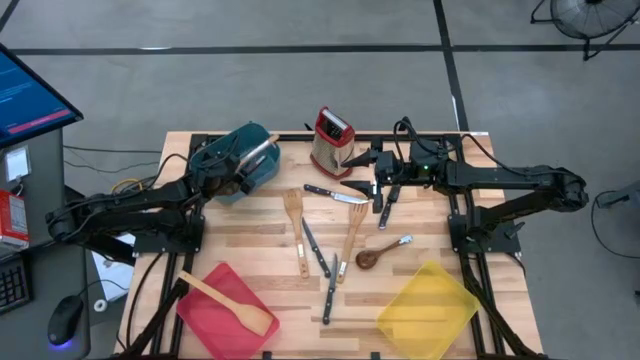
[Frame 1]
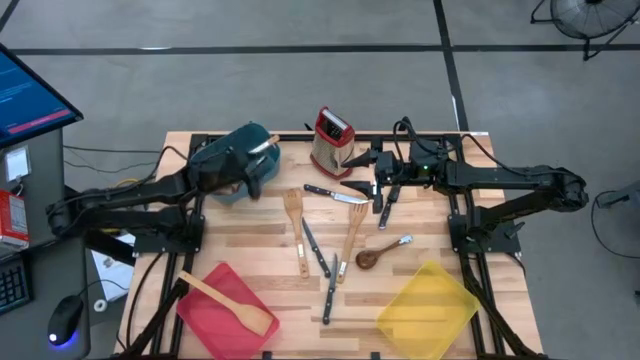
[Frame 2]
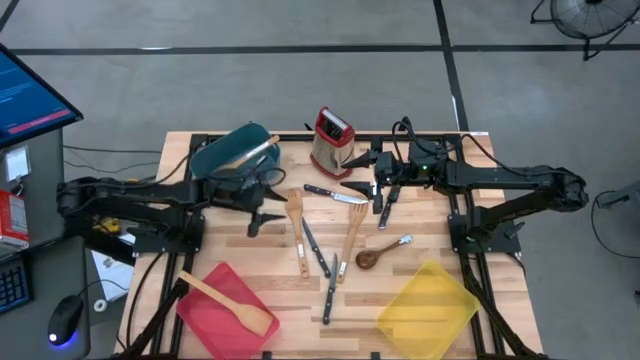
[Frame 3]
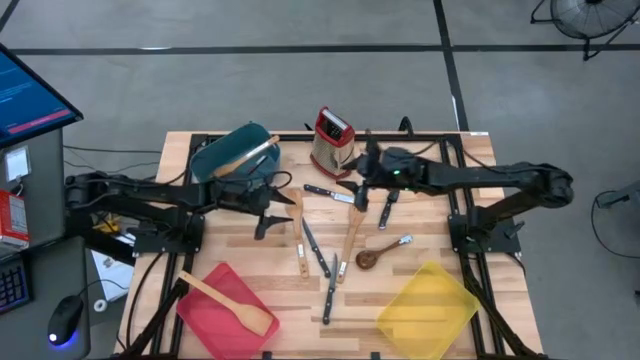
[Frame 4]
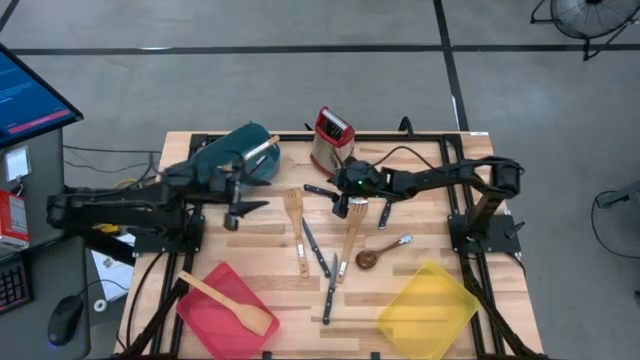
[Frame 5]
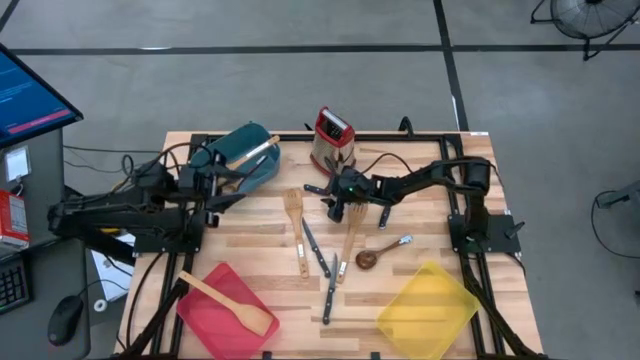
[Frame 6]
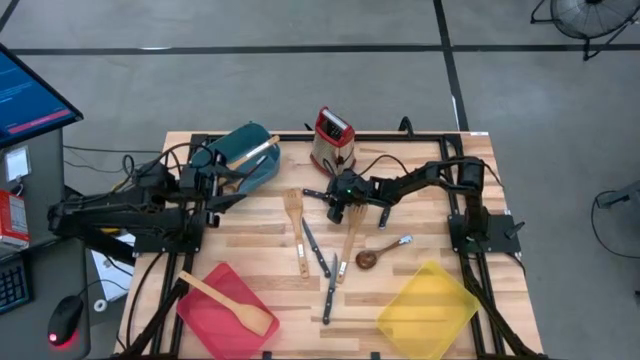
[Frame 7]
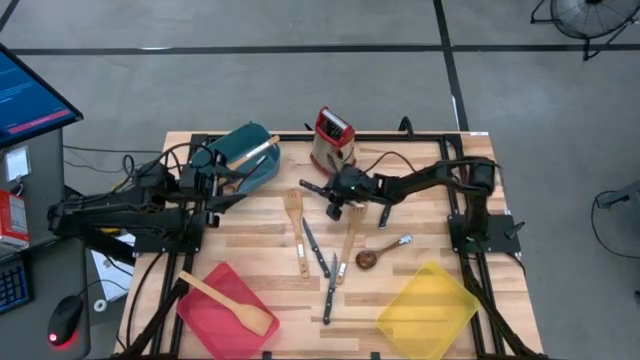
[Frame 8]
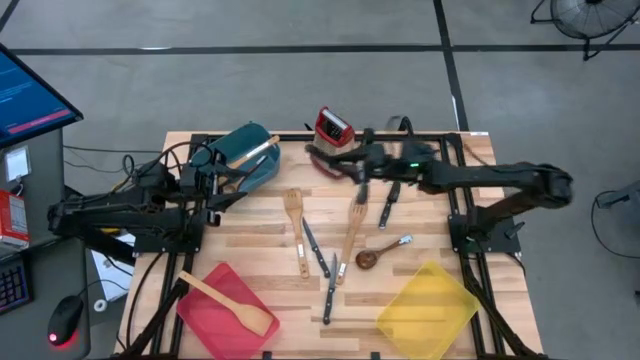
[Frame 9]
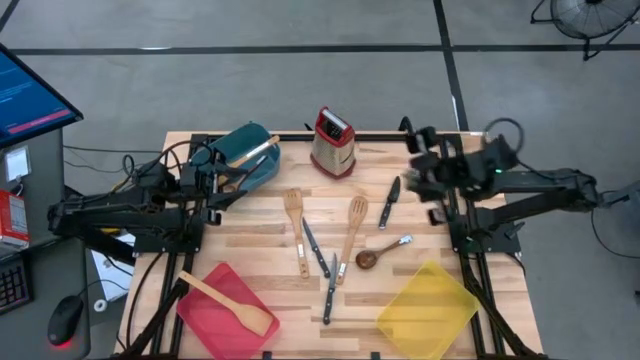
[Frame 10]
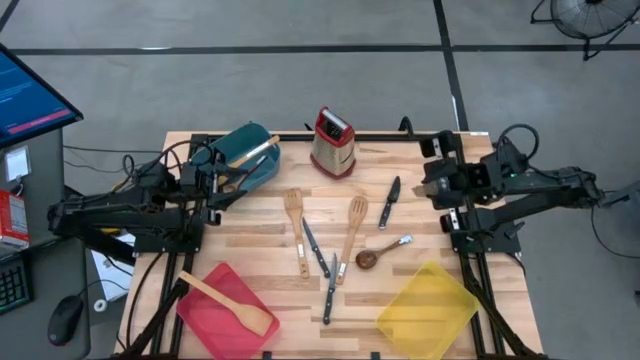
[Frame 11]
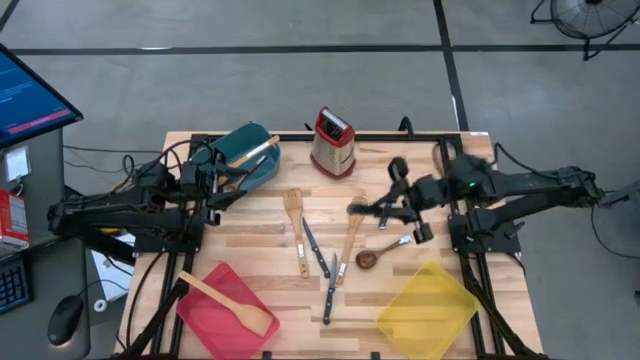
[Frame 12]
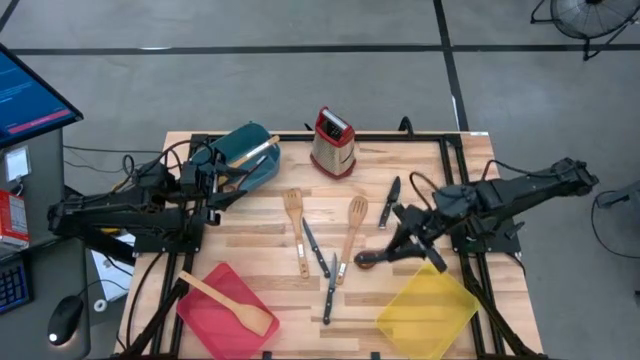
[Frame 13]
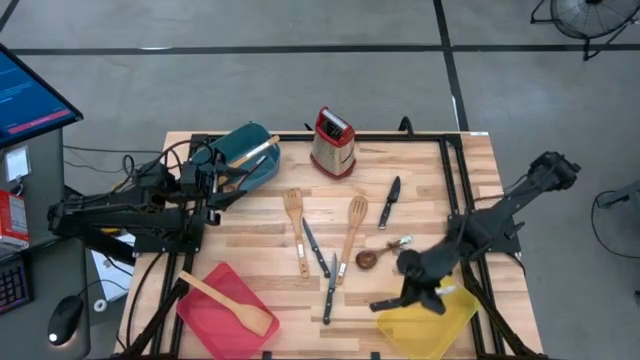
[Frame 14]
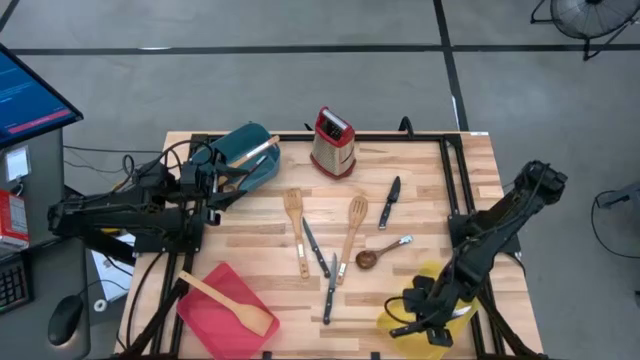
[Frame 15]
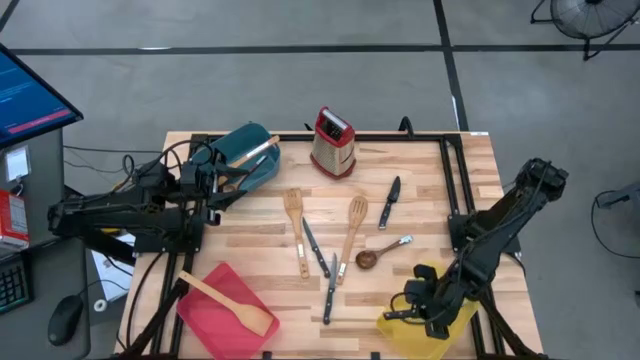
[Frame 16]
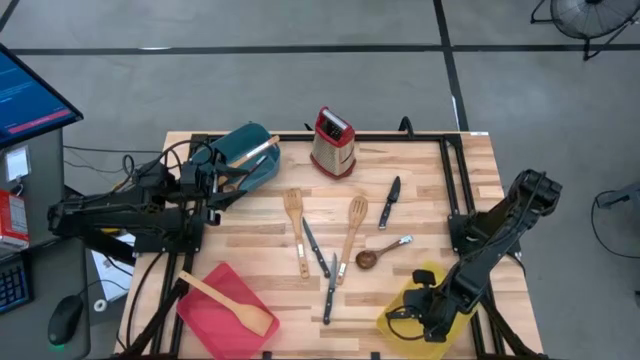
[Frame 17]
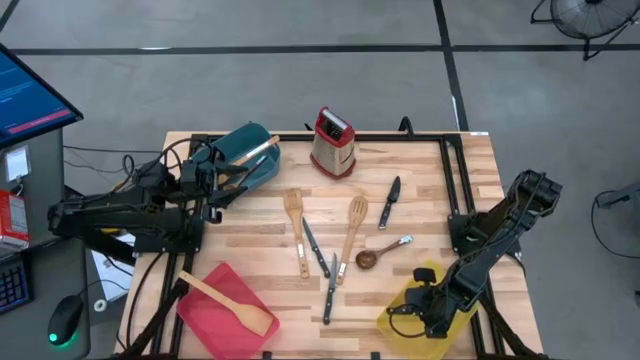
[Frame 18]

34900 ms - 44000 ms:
Task: Pick & Place Kitchen Items
Put the black table knife into the yellow bin

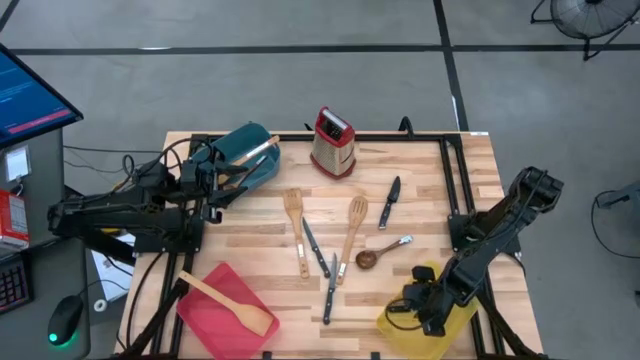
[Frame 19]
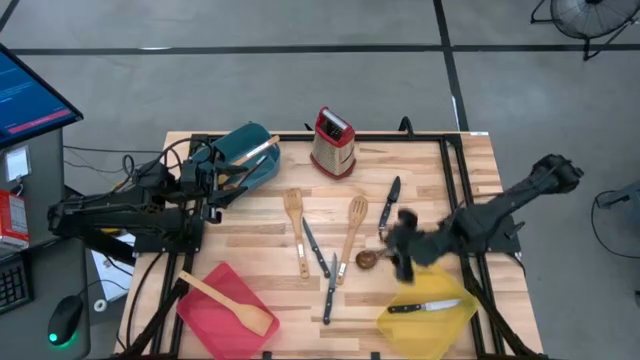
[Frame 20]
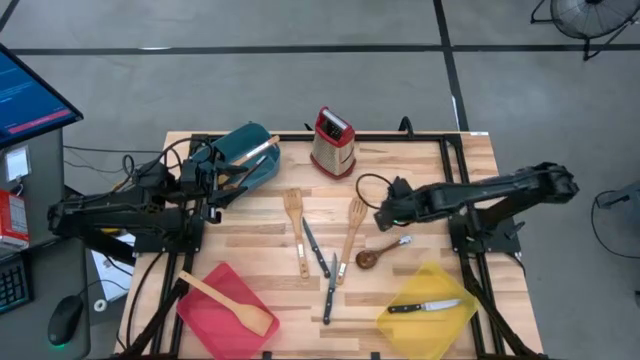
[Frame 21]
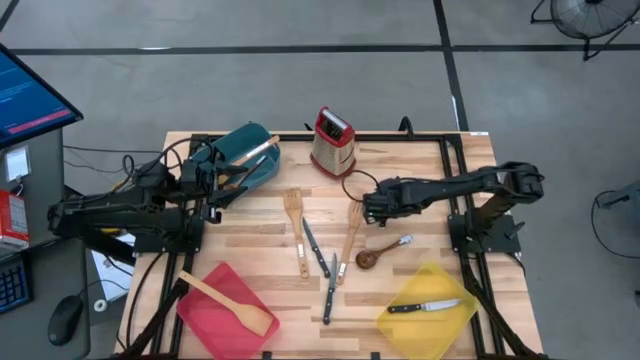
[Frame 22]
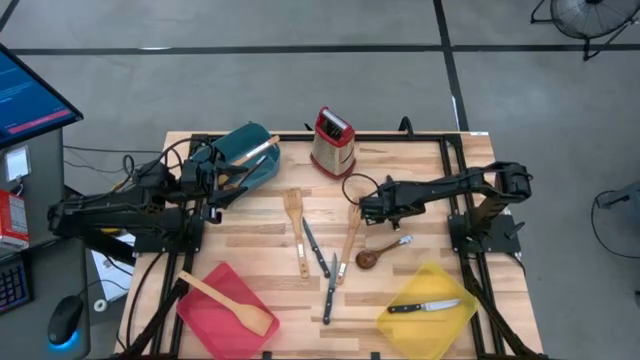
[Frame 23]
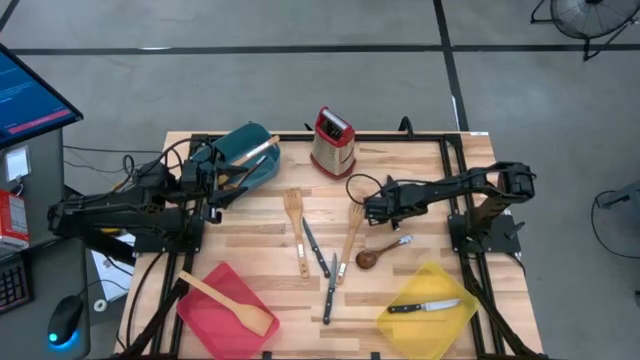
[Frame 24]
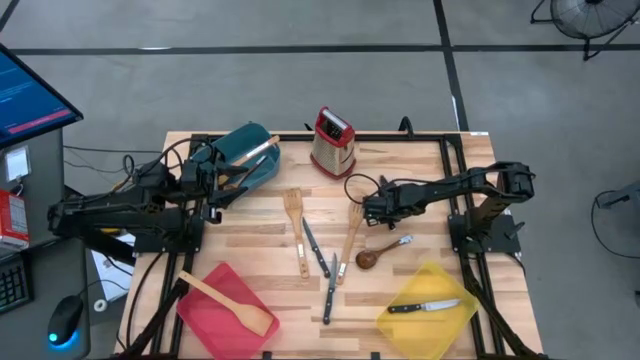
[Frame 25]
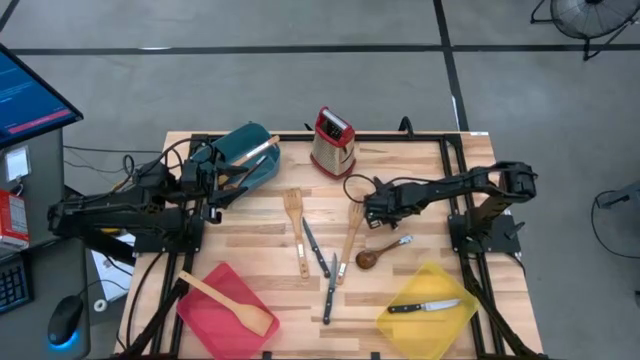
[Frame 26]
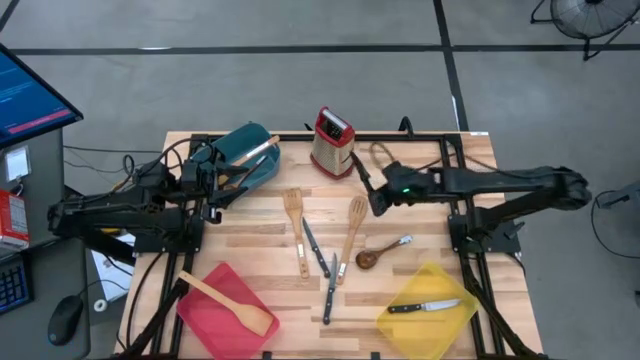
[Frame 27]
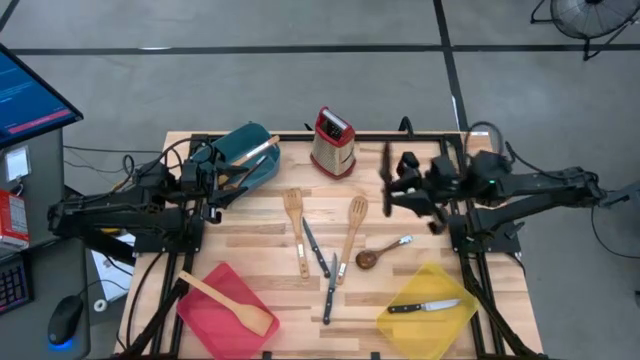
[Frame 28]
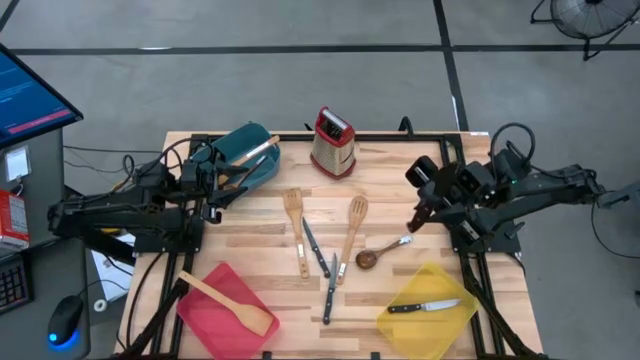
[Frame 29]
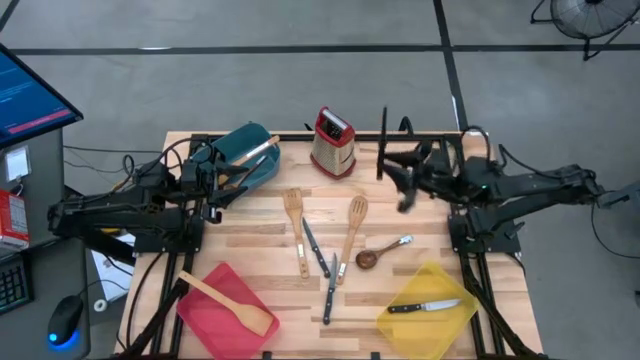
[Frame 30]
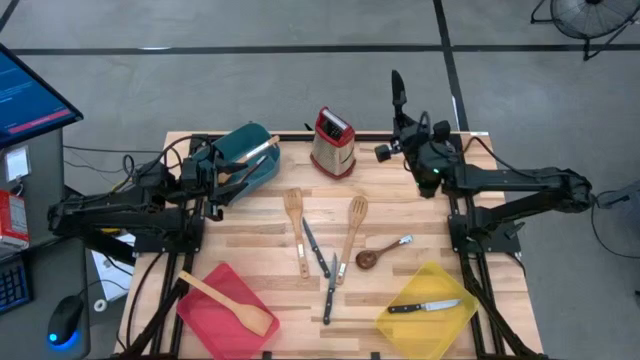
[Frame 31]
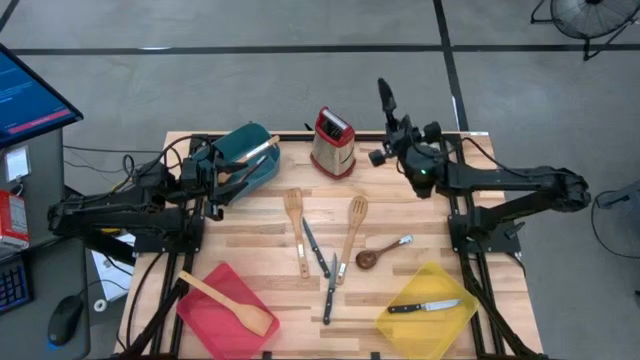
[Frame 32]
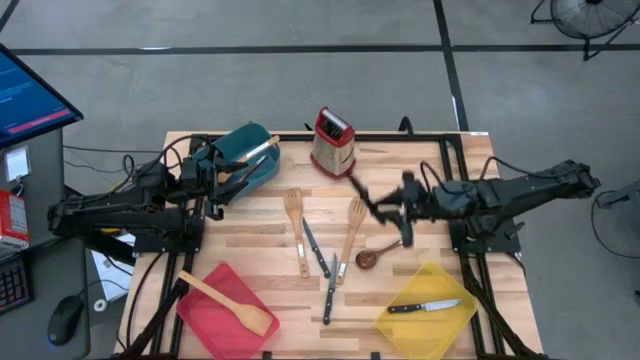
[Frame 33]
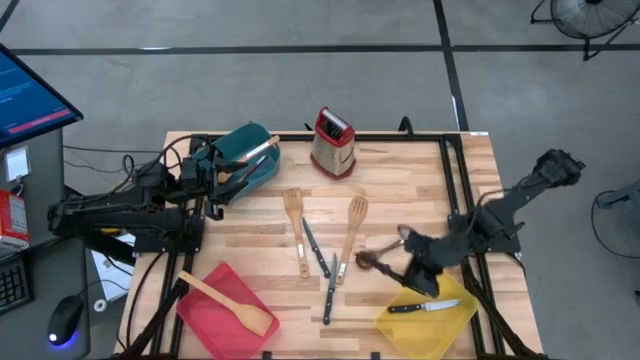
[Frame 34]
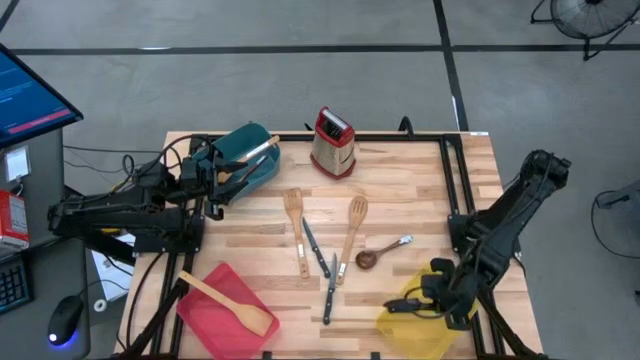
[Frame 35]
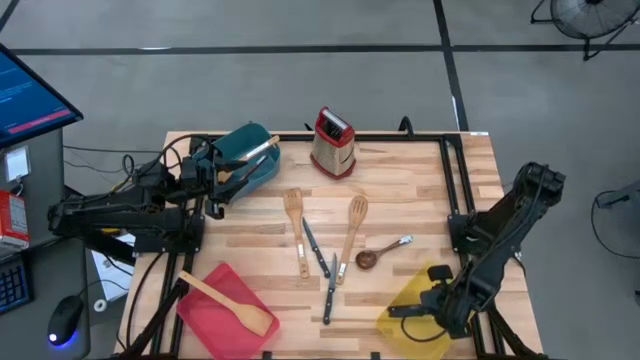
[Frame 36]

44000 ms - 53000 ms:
Put the black table knife into the yellow bin

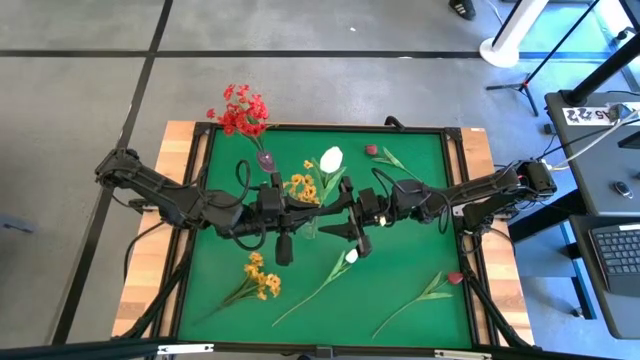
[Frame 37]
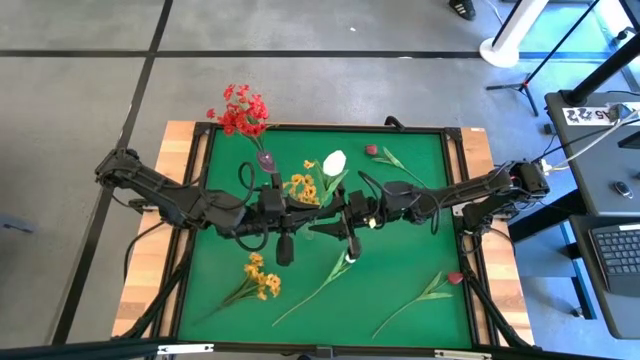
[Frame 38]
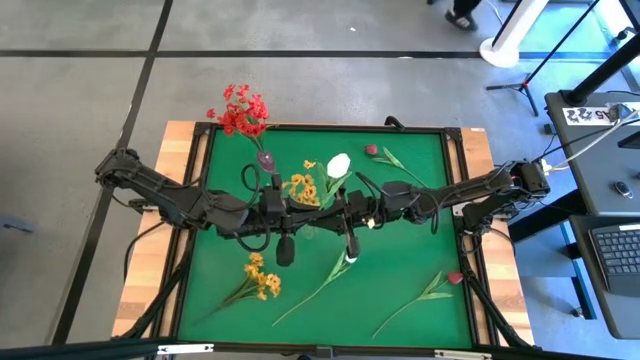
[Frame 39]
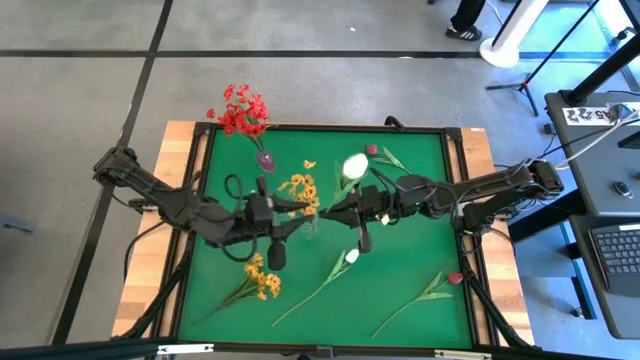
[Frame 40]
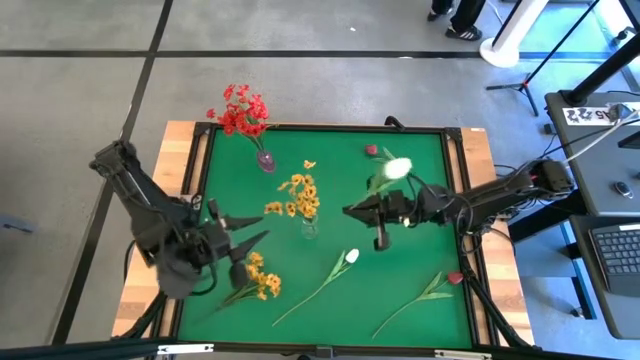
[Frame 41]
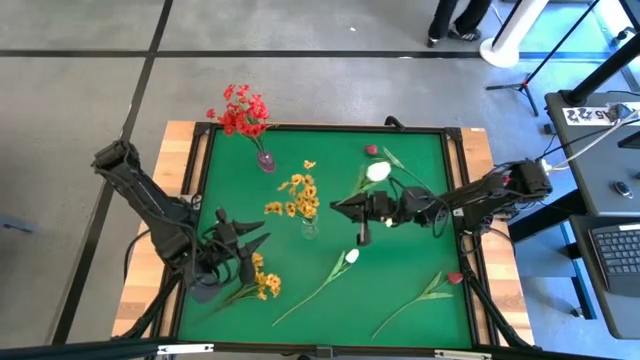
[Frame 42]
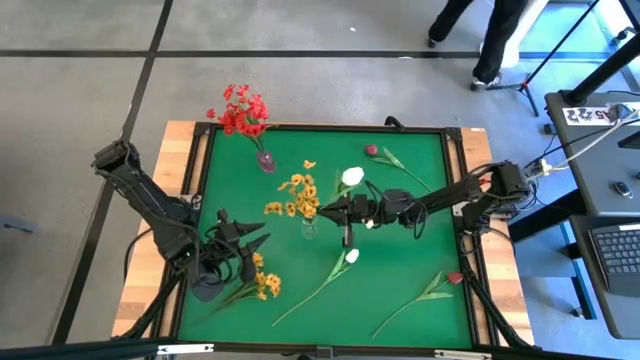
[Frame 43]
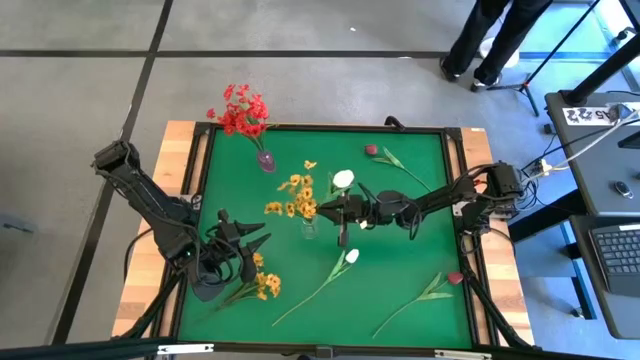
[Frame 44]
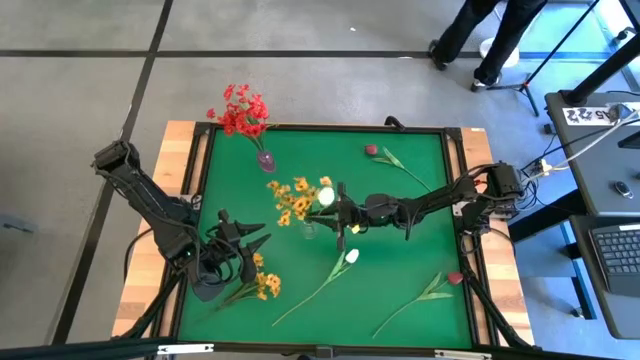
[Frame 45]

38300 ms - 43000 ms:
Task: Sort flowers into vase by color
Put the top white tulip into the transparent vase
